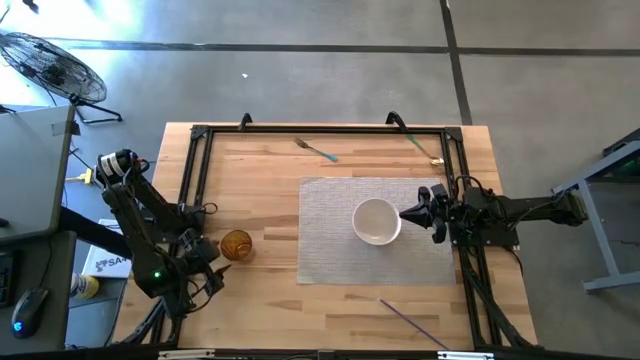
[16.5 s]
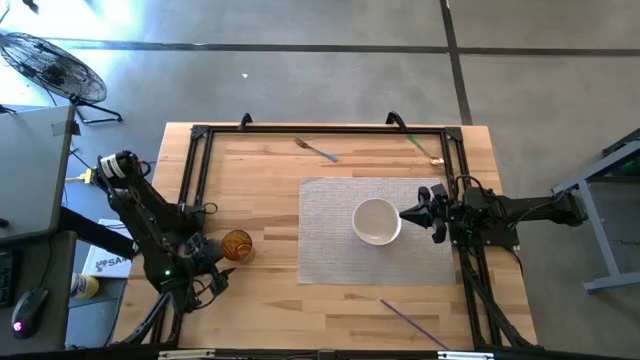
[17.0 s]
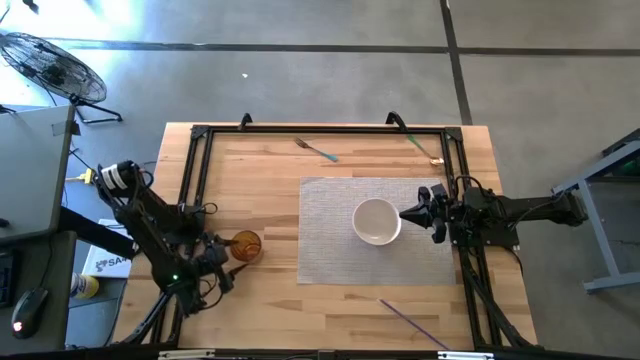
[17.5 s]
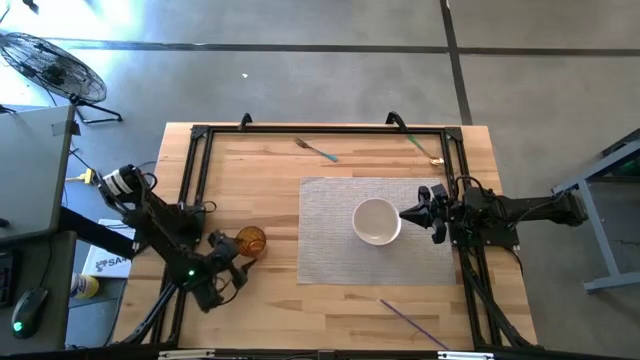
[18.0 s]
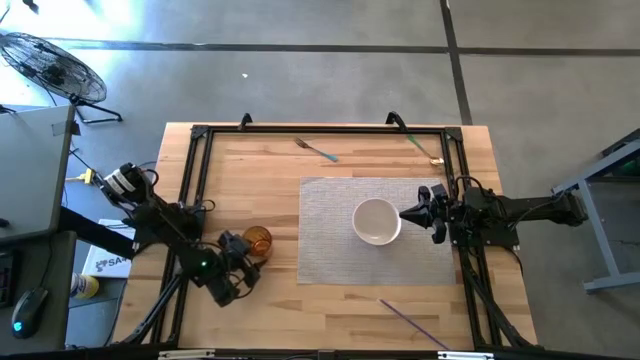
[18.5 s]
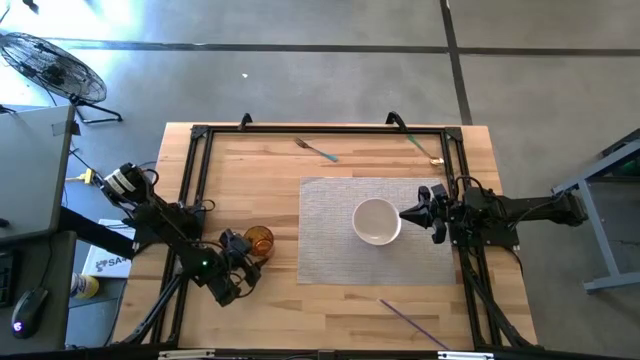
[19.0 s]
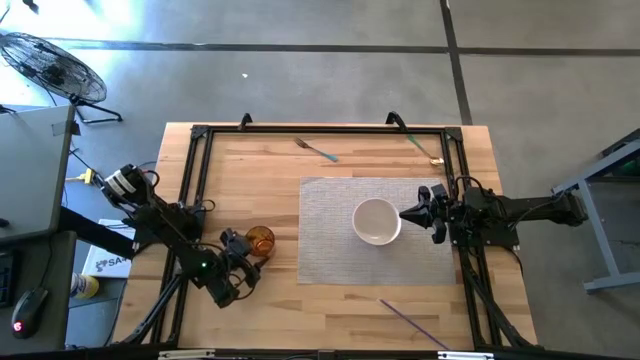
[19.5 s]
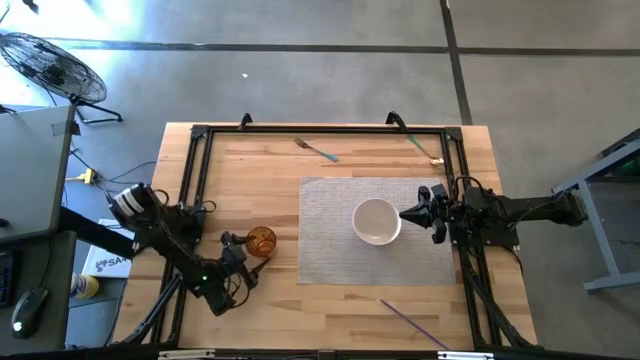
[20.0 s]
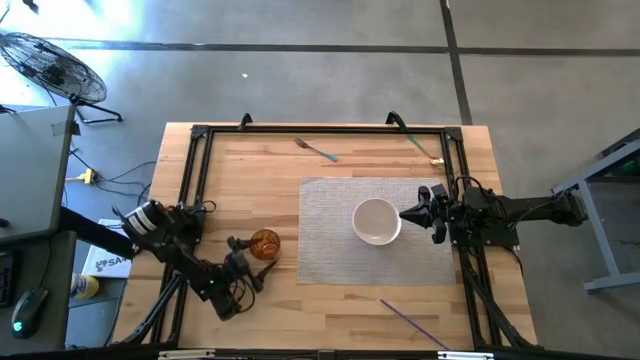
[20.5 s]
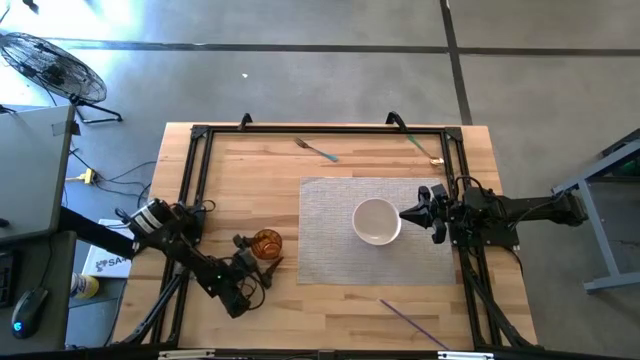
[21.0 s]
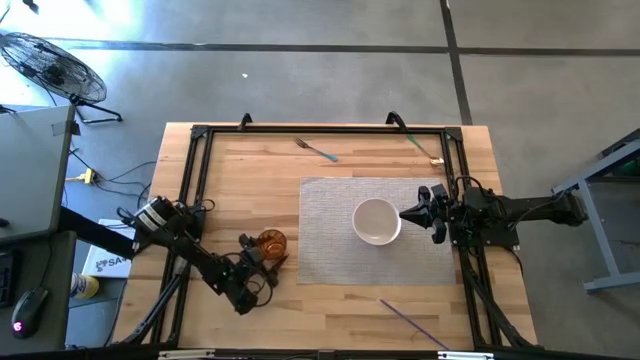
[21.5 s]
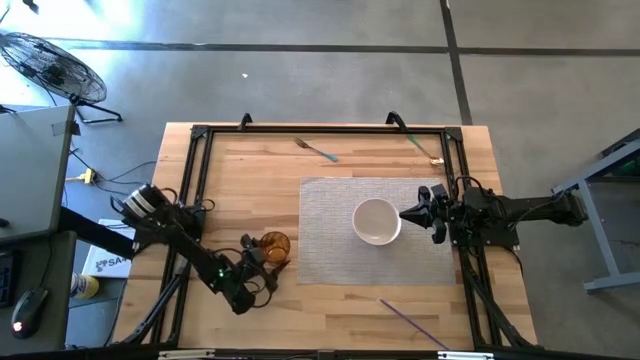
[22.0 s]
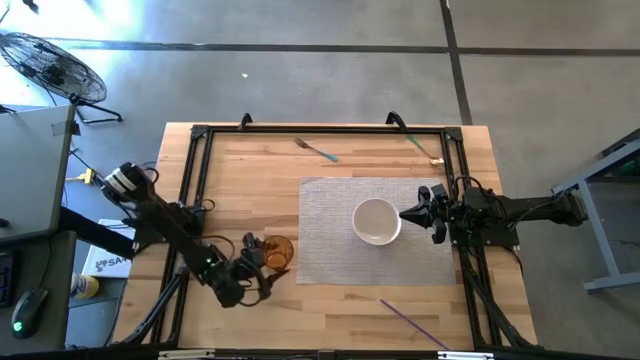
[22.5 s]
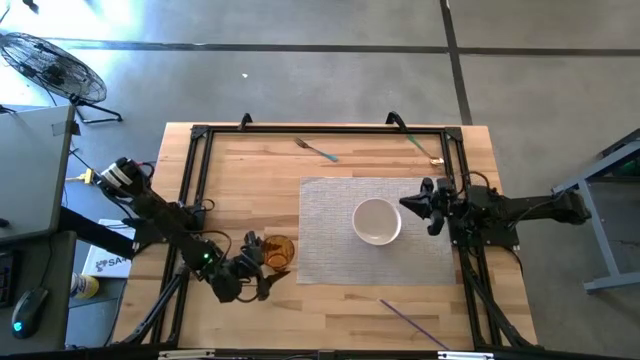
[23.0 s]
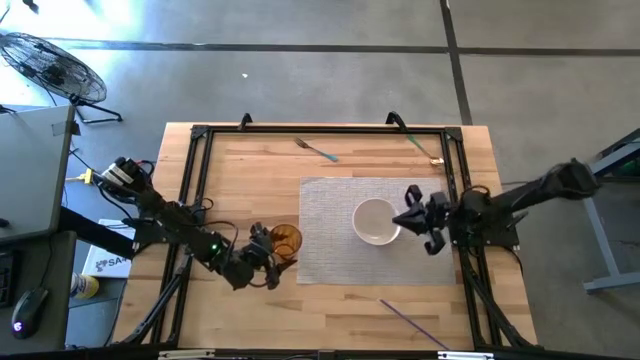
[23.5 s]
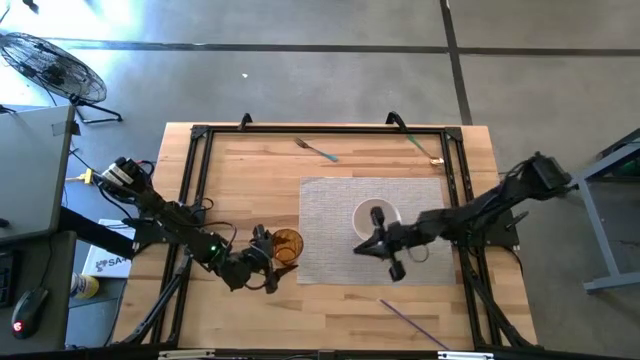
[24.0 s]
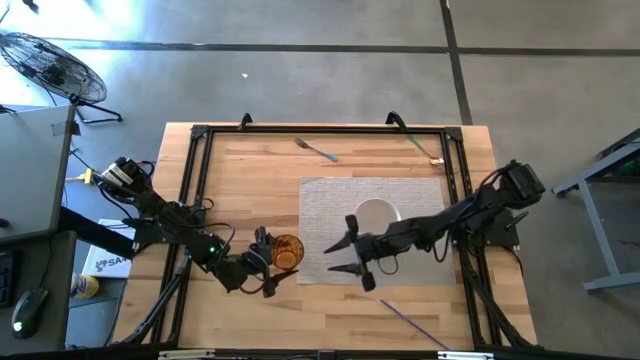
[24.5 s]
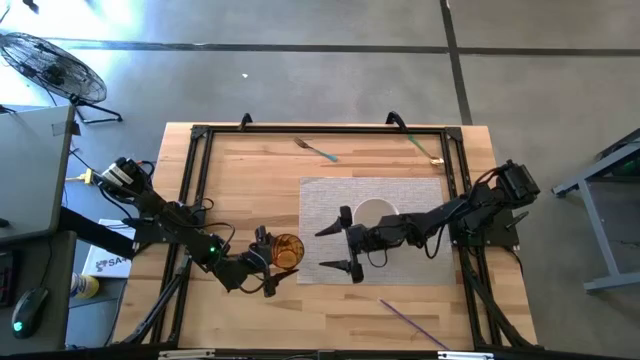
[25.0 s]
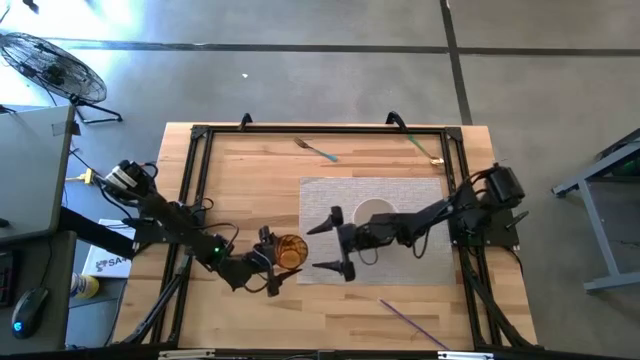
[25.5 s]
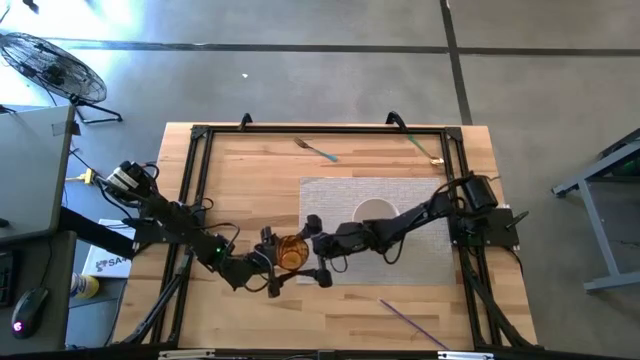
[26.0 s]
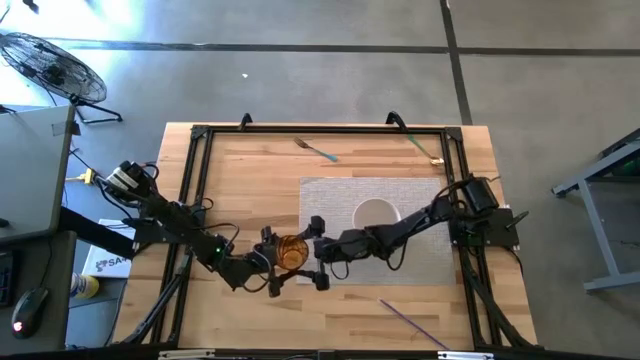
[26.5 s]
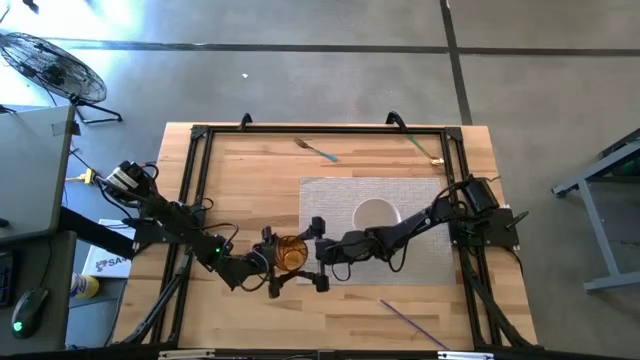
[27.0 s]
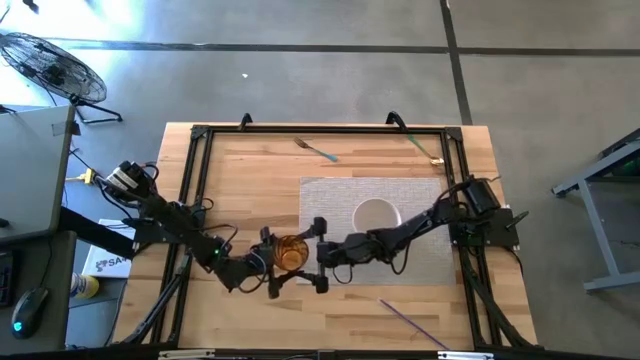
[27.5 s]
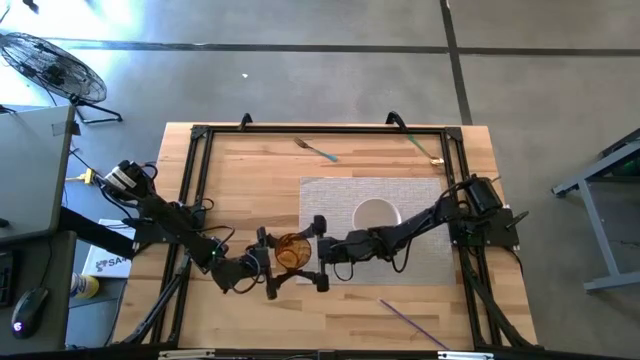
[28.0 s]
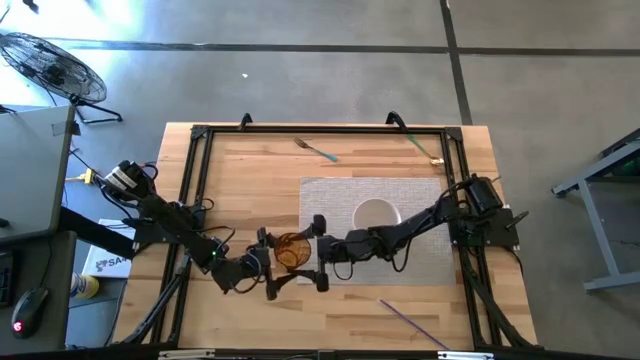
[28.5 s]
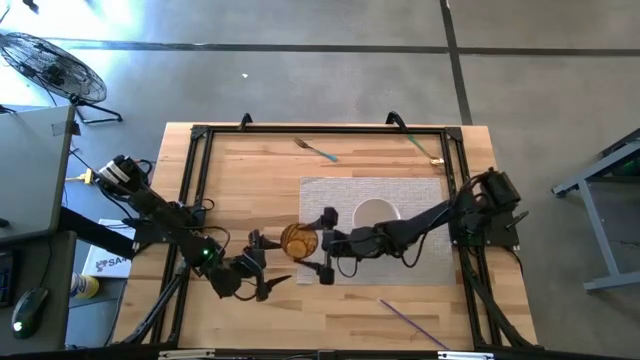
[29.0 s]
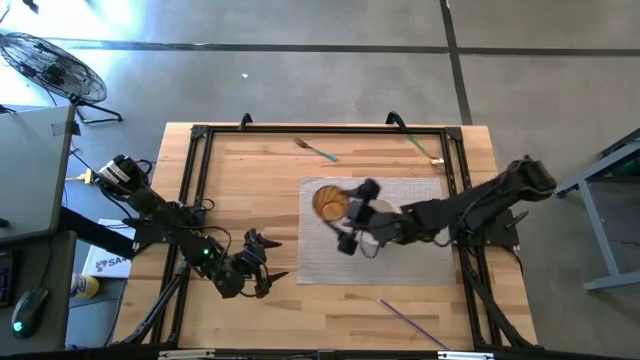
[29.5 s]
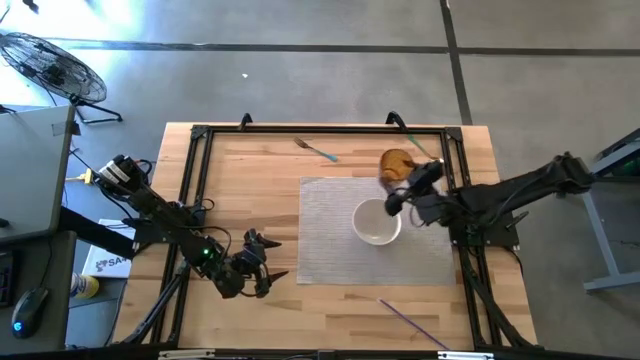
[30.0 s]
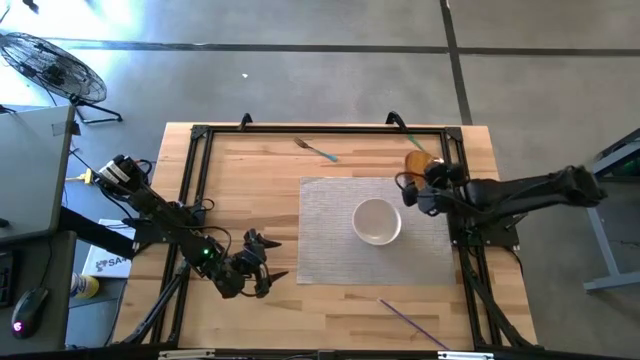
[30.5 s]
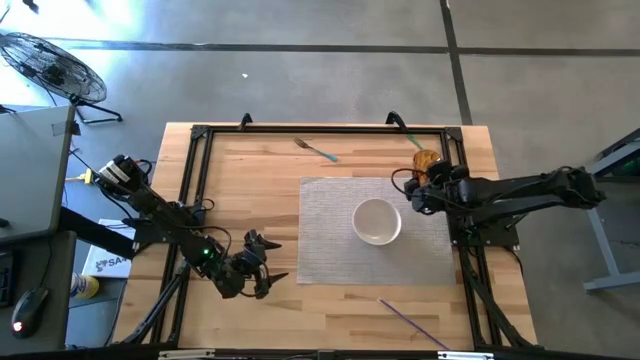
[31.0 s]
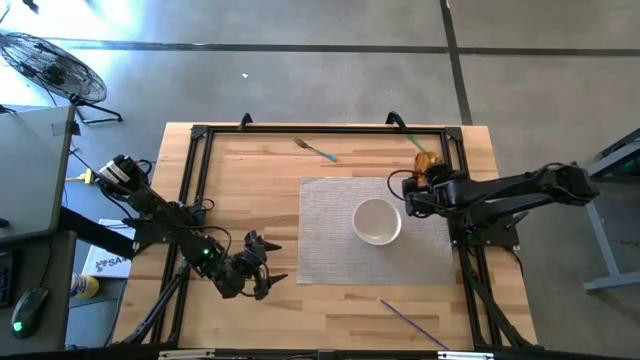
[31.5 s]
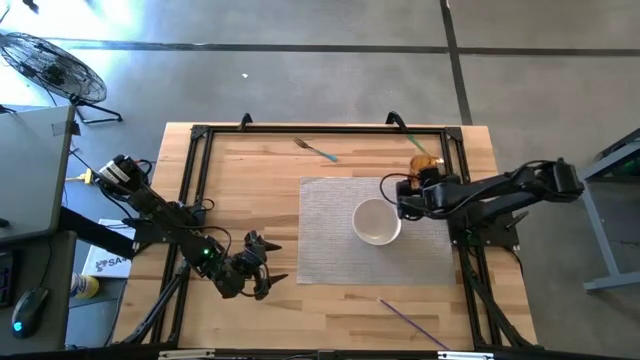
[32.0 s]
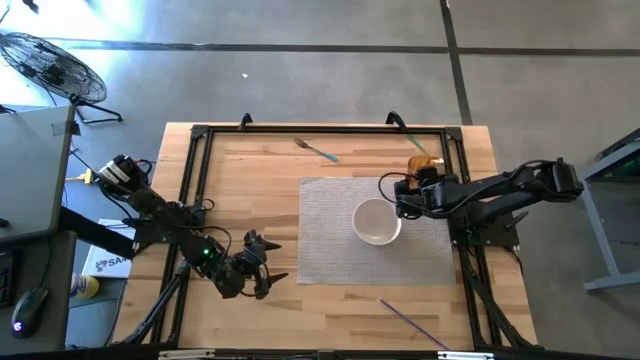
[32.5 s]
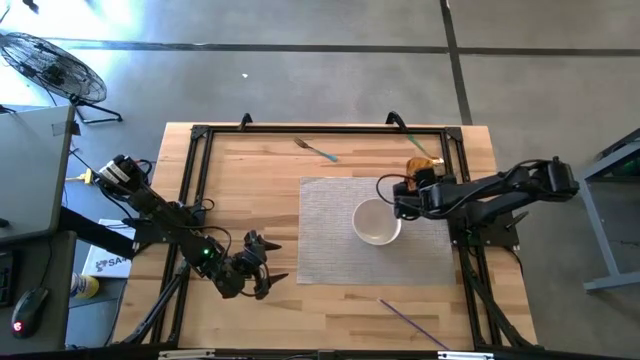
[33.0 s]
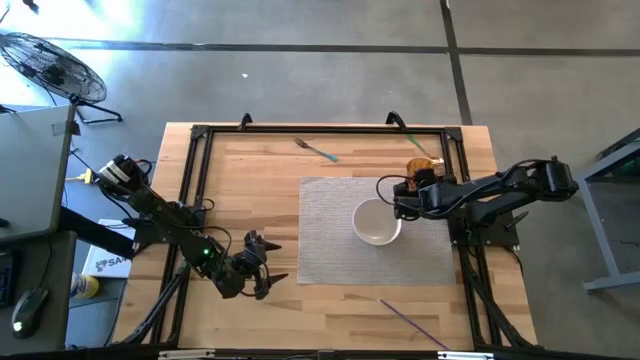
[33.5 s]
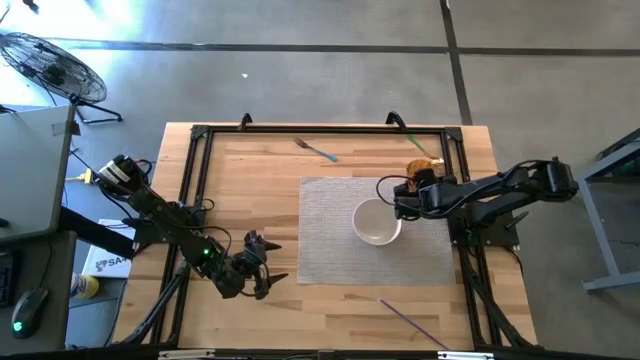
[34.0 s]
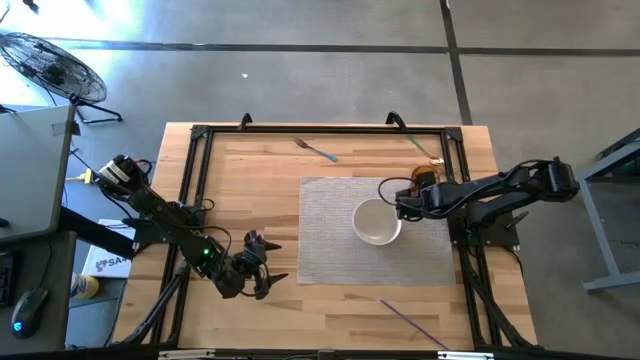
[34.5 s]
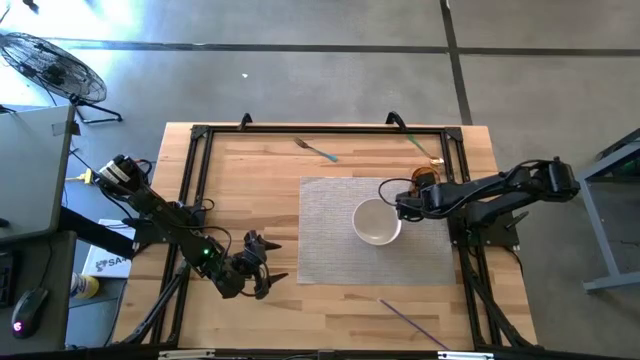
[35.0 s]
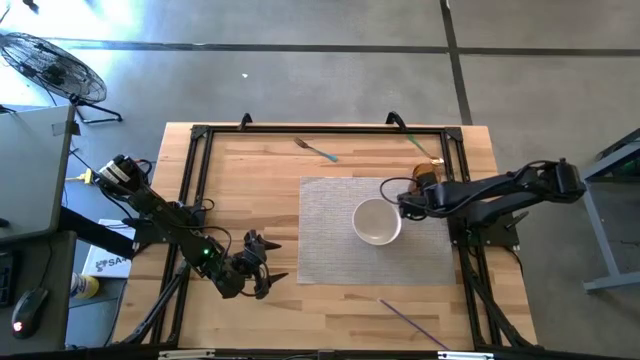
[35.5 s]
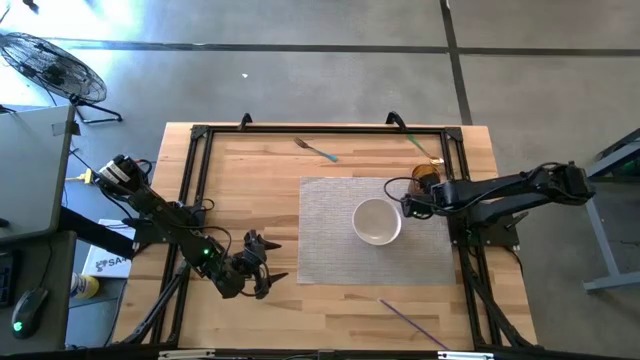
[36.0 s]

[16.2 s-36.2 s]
Task: Pick & Place Utensil
Put the brown cup on the gray mat to the top right of the white bowl

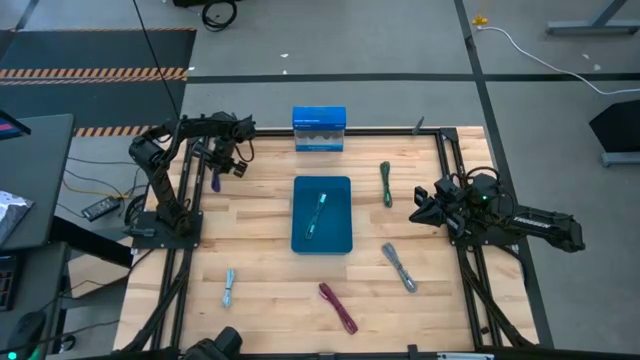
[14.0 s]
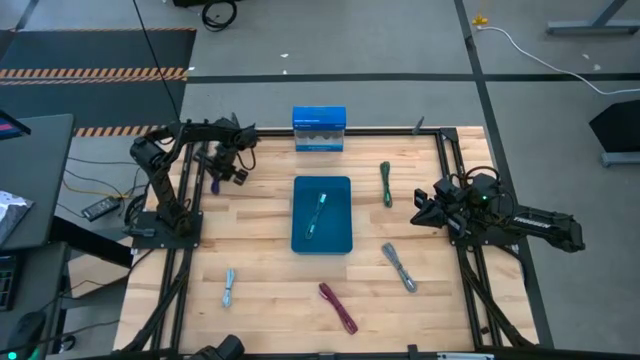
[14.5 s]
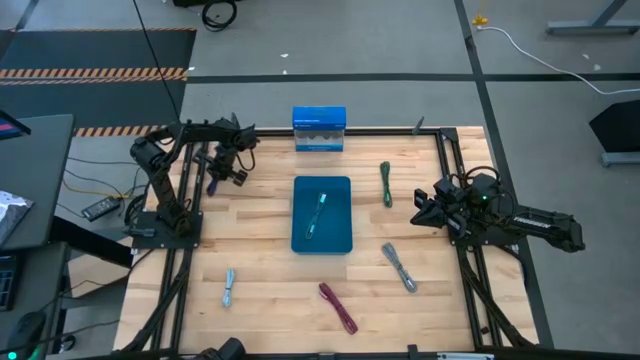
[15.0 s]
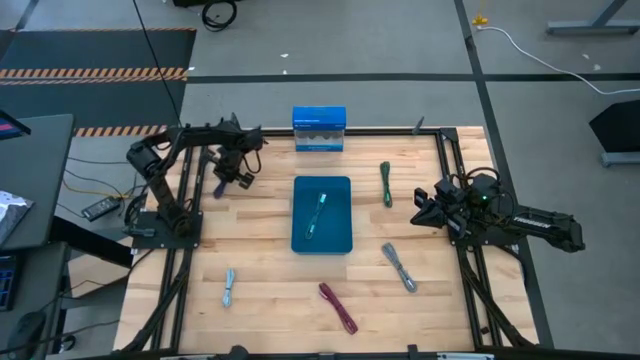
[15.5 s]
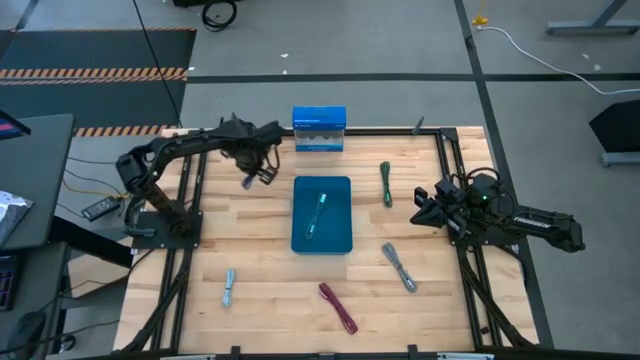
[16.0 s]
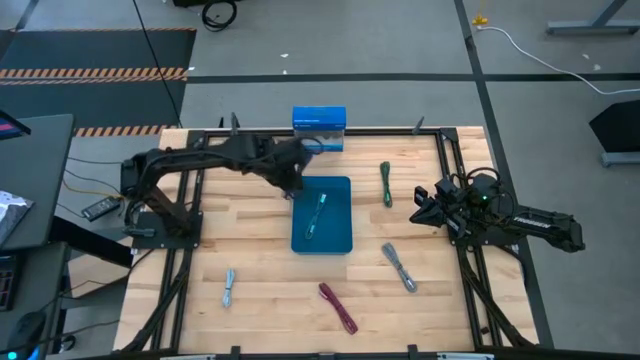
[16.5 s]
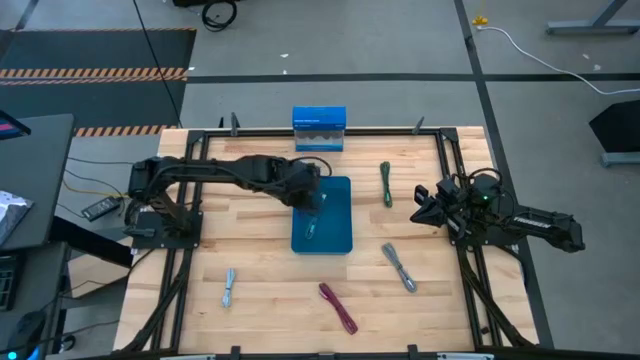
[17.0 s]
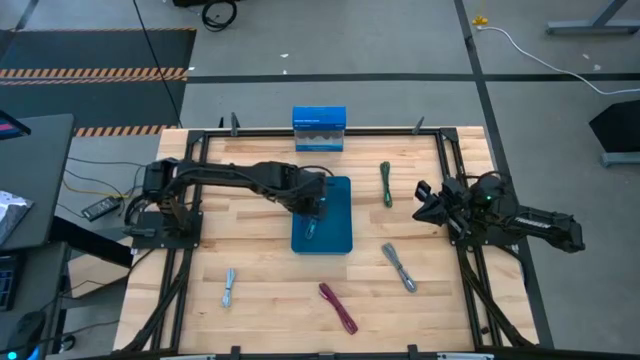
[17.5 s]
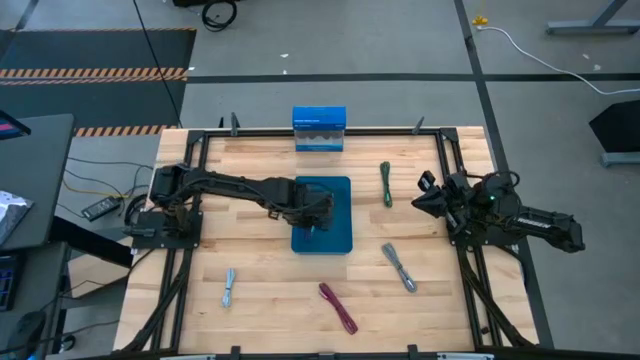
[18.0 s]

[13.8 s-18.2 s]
Task: Pick and place USB-C Cables
Put the violet charger cable into the blue bin
